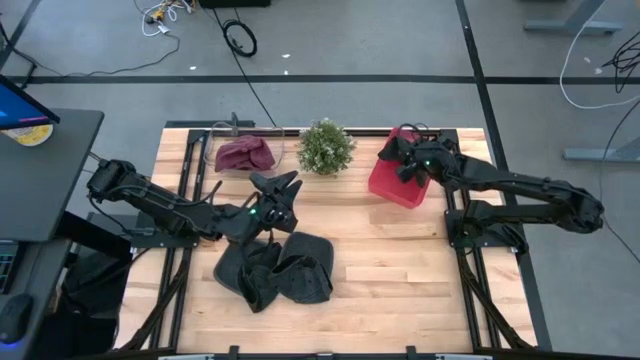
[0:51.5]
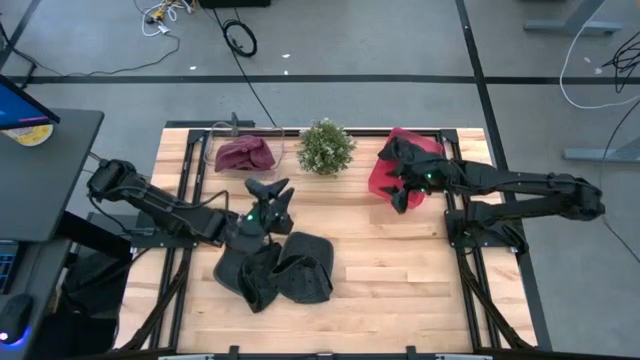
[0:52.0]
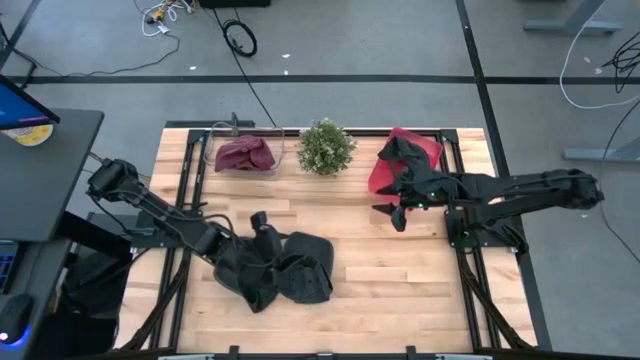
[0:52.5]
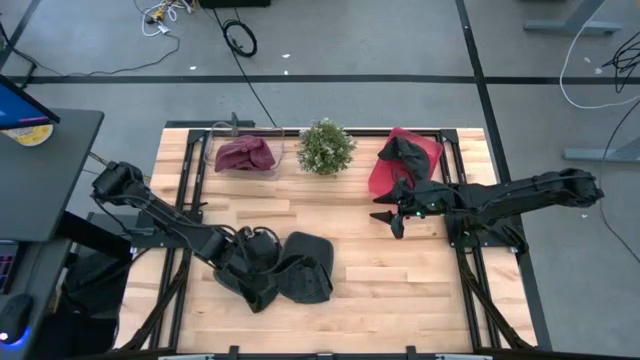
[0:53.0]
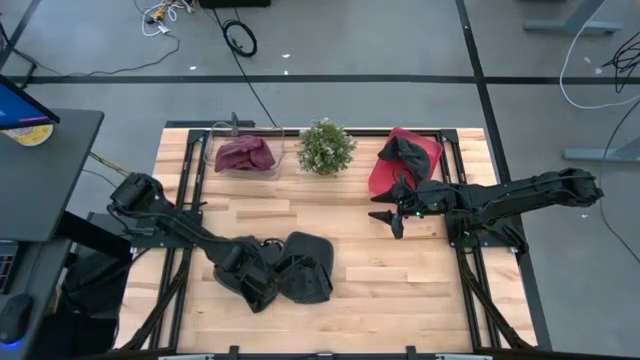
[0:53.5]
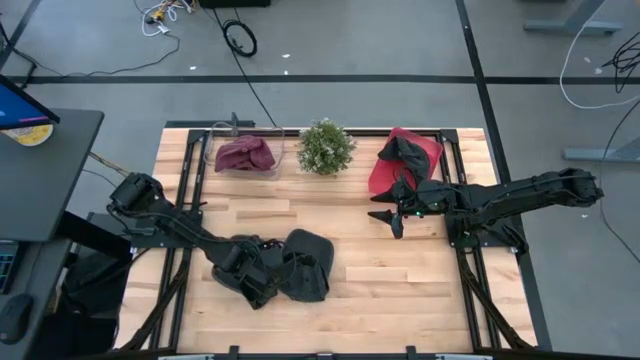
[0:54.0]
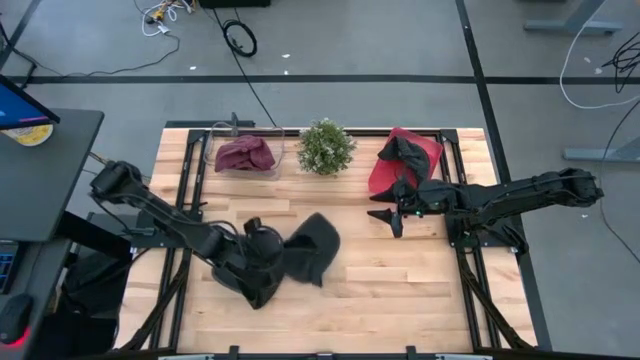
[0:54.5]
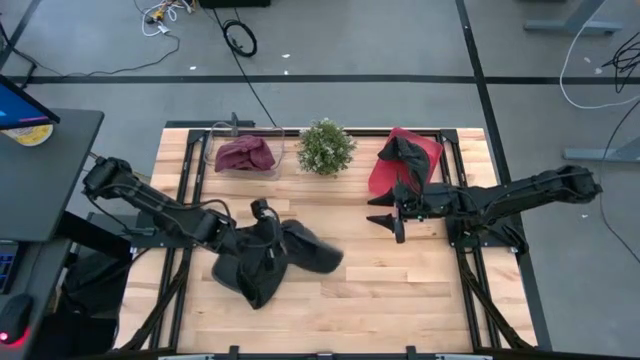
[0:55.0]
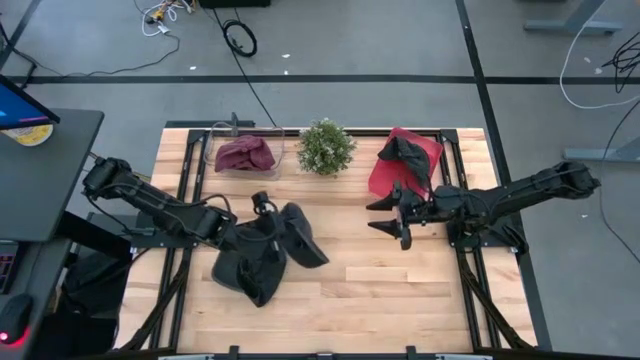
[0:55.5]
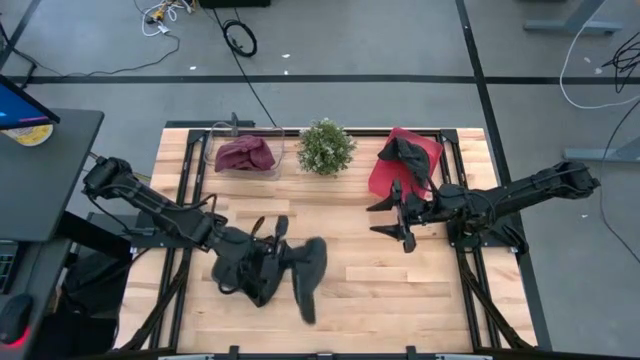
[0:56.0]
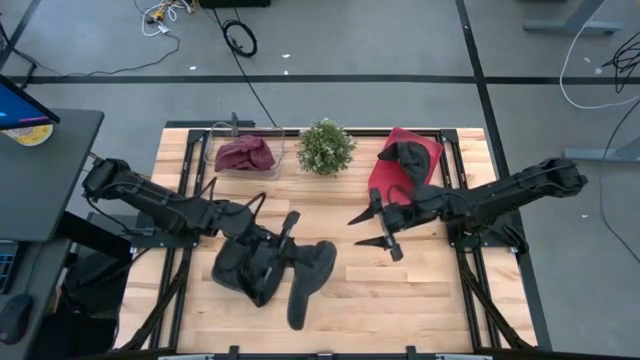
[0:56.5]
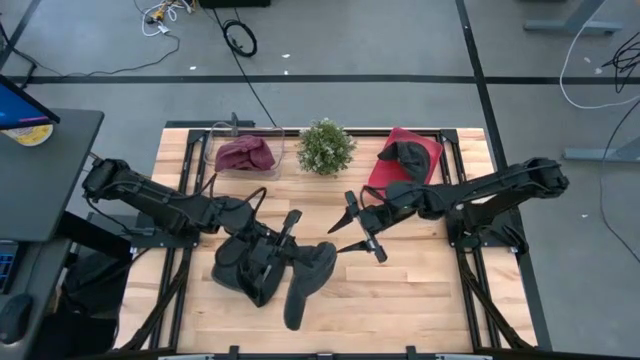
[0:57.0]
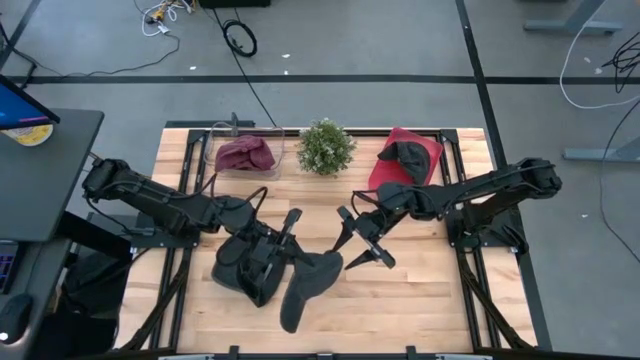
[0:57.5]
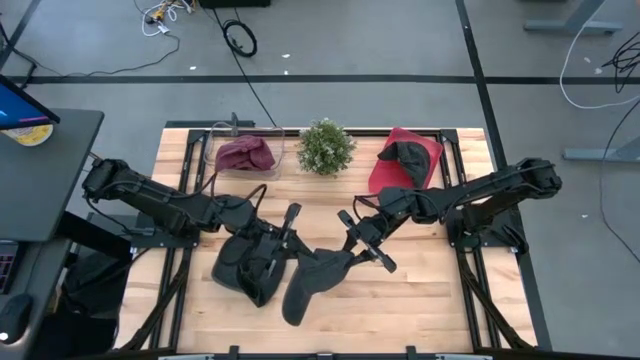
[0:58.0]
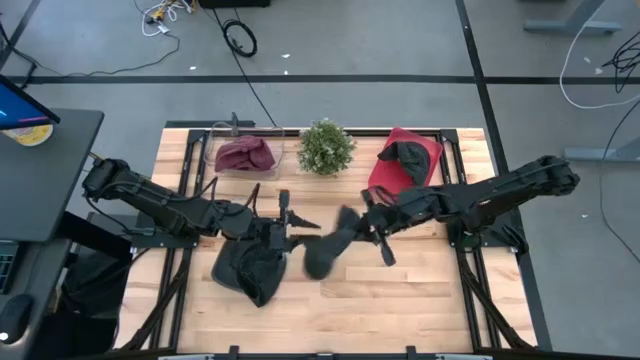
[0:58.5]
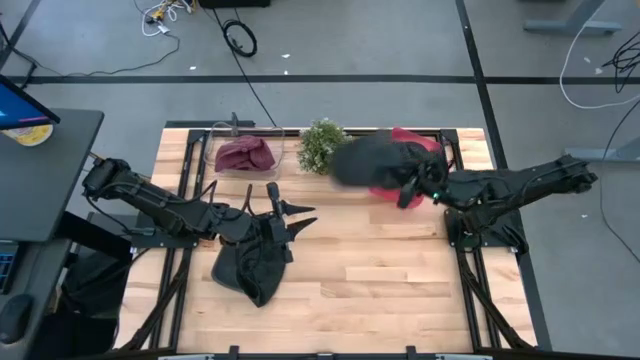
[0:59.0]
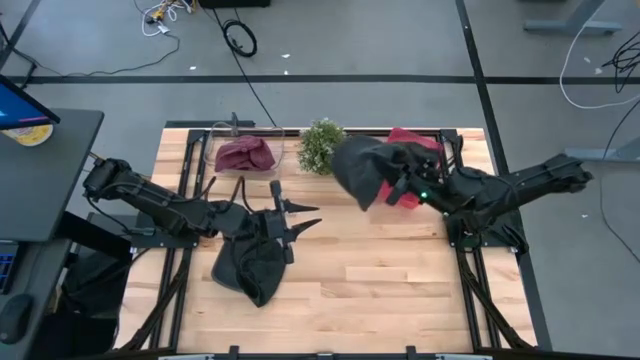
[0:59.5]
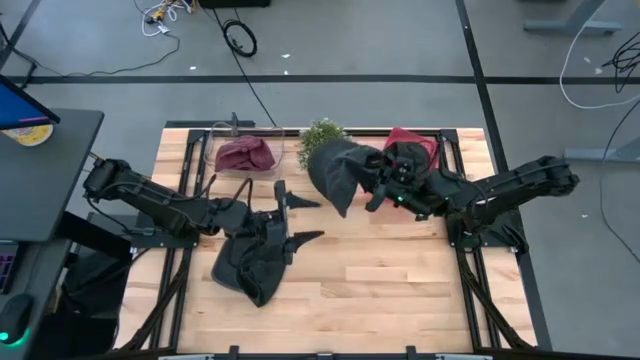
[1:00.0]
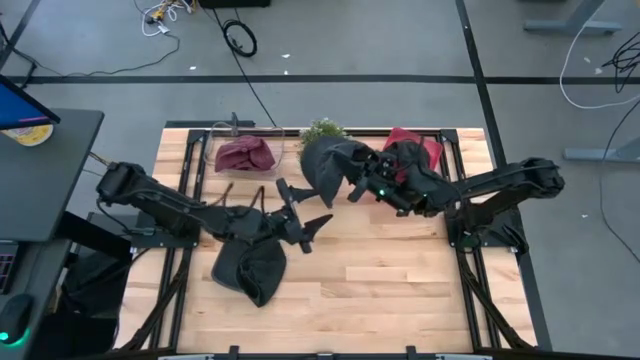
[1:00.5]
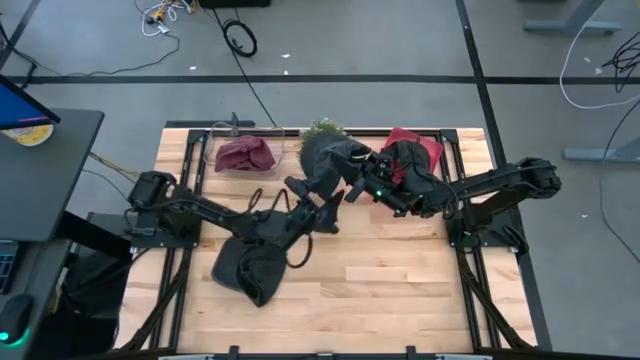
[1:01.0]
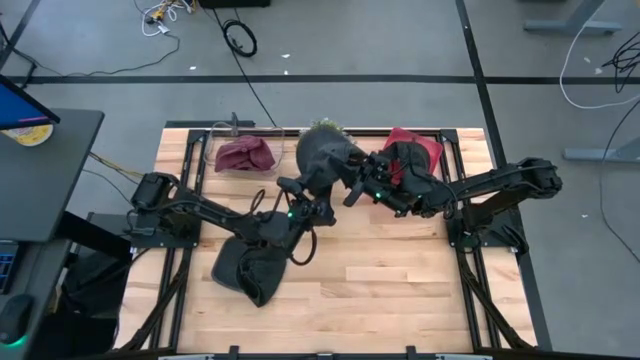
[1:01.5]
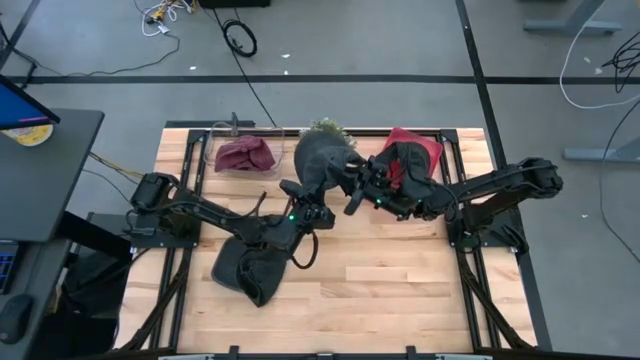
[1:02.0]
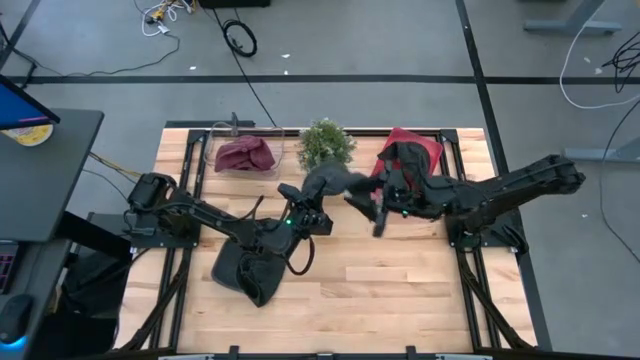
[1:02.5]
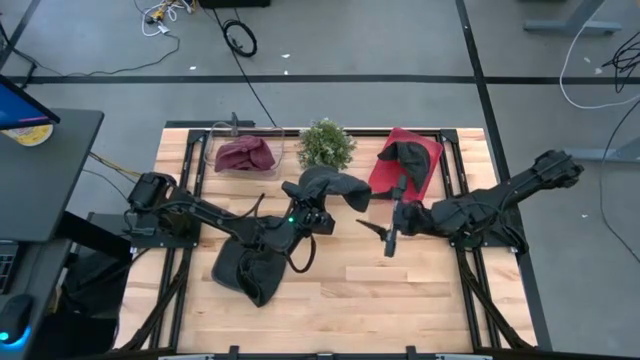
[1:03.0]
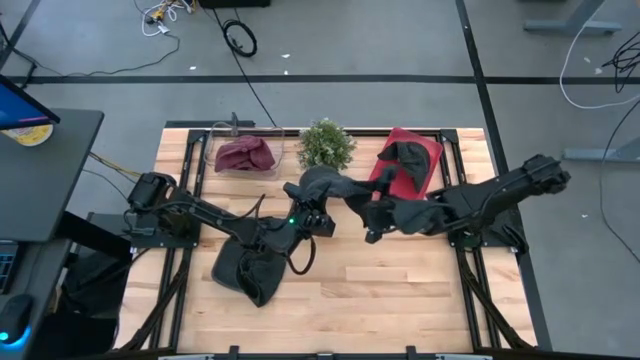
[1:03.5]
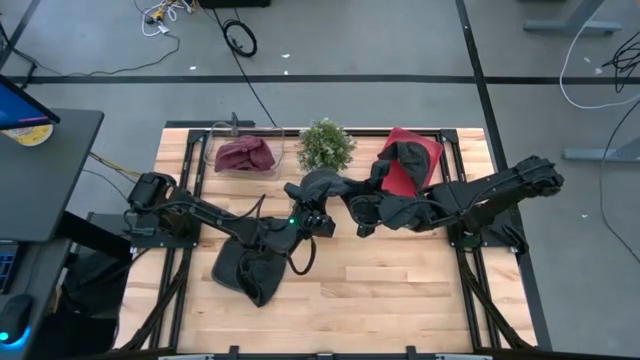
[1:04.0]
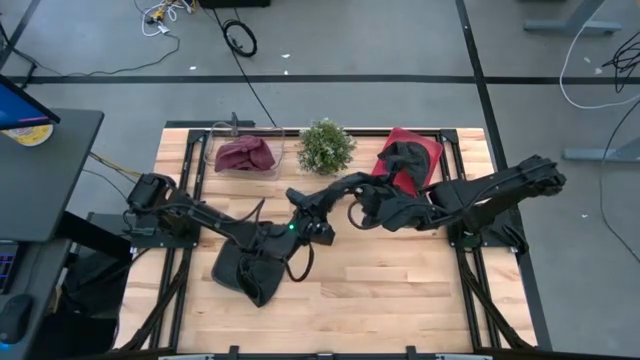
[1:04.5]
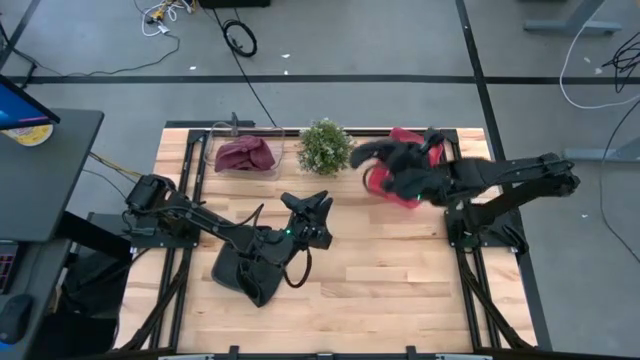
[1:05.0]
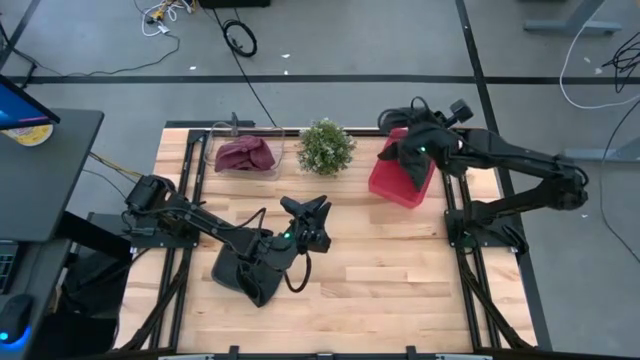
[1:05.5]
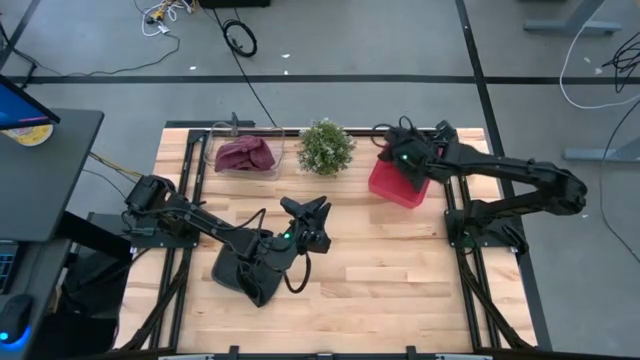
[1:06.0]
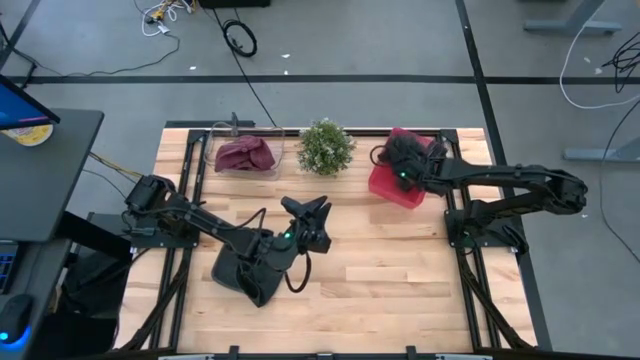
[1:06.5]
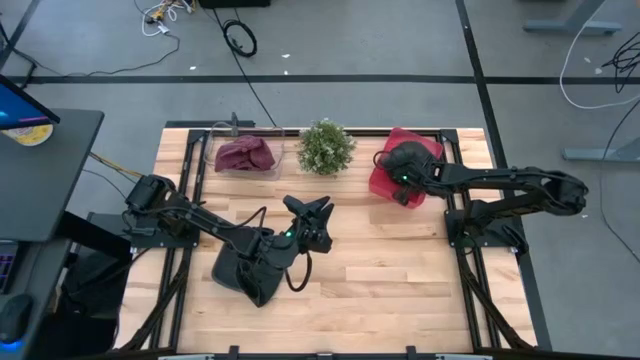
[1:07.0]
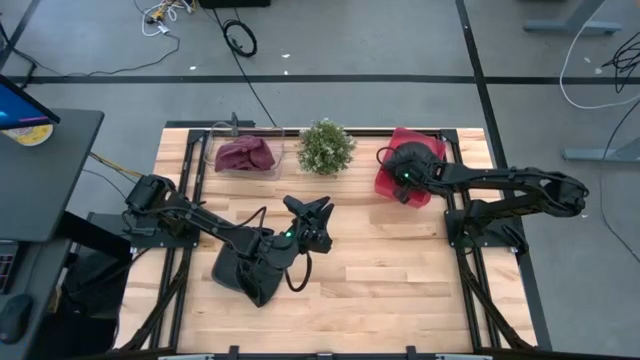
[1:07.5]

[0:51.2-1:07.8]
Task: Pick & Place hat
Put the right black cap into the red bin

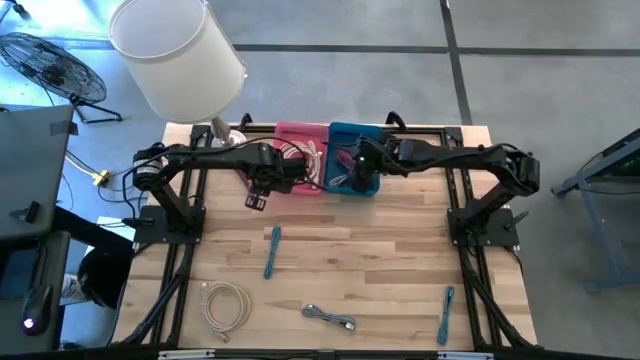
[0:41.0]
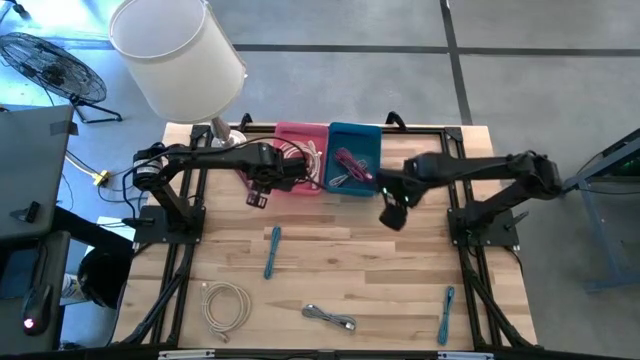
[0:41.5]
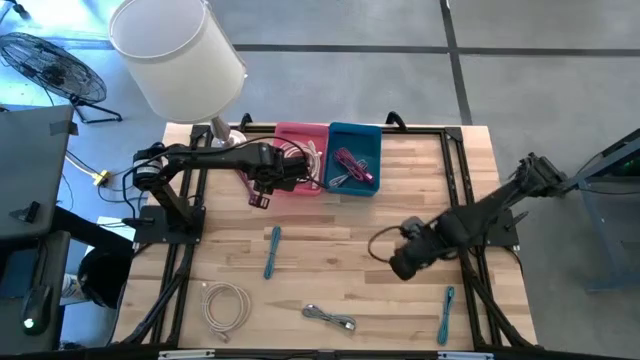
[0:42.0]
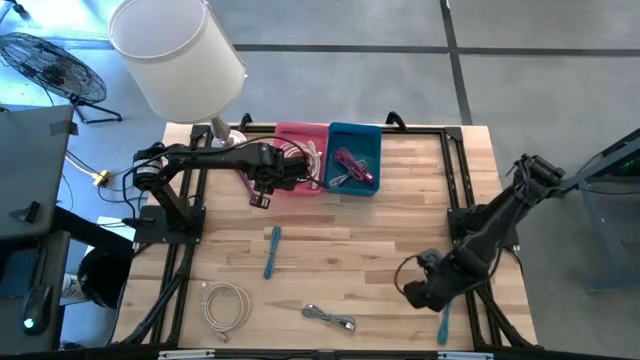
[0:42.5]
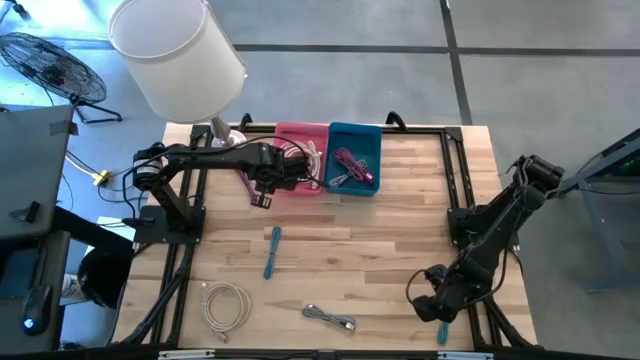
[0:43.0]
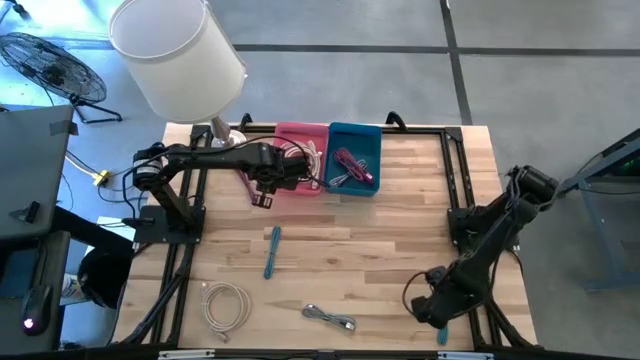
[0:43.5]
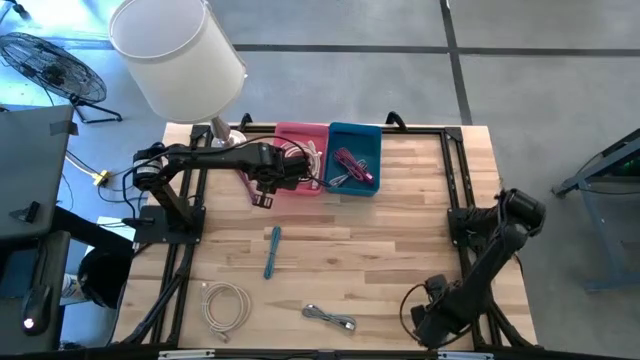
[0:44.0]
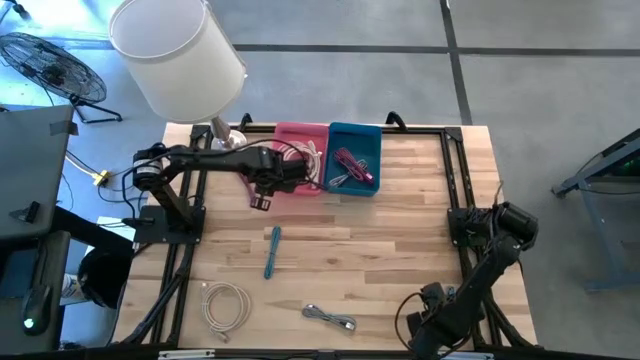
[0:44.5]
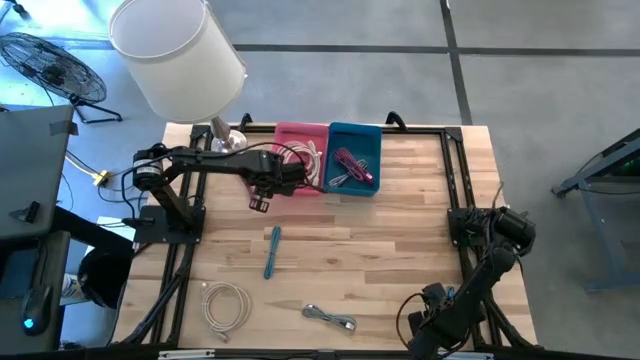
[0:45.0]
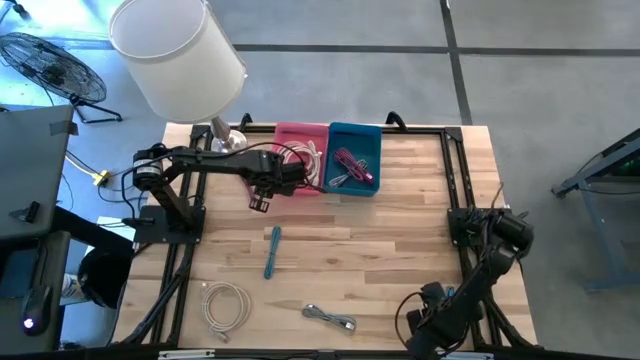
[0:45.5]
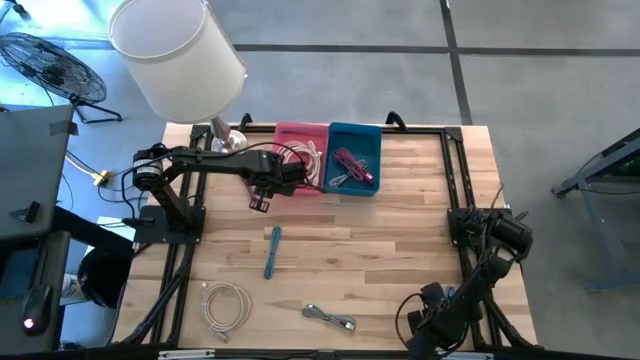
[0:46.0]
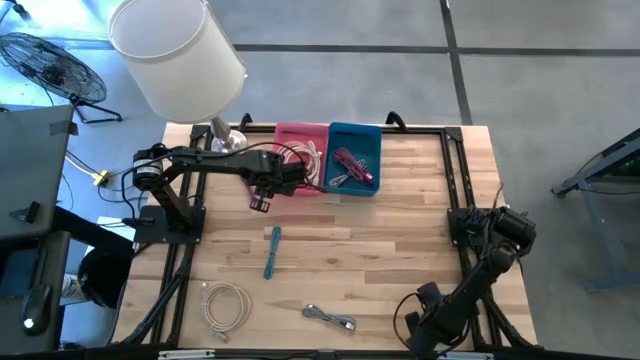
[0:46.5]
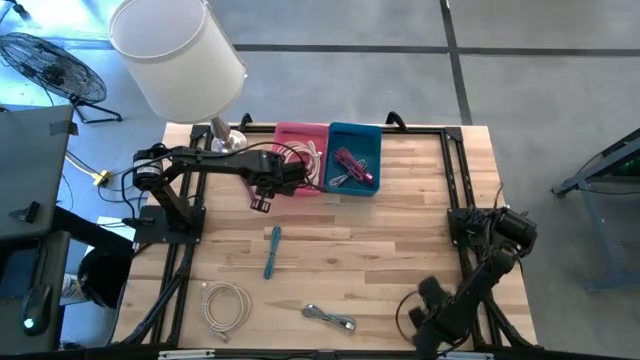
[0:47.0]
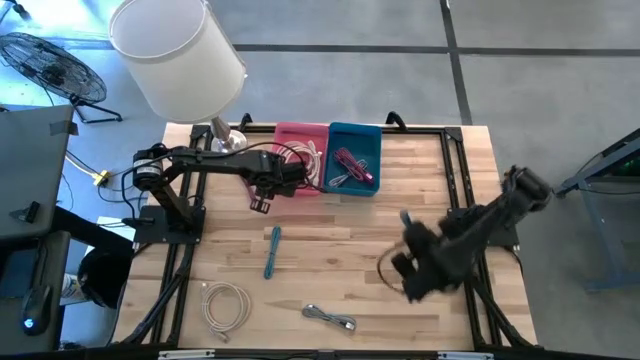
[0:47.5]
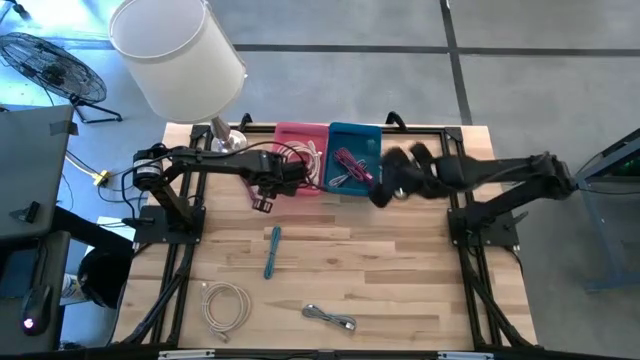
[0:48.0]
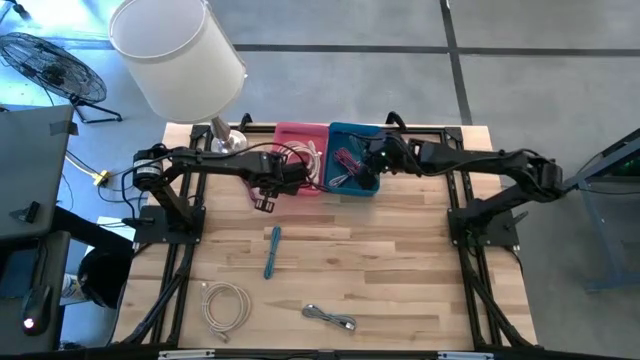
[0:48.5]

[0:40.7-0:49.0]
Task: Pick & Place USB Port
Put the right blue charger cable into the blue bin
